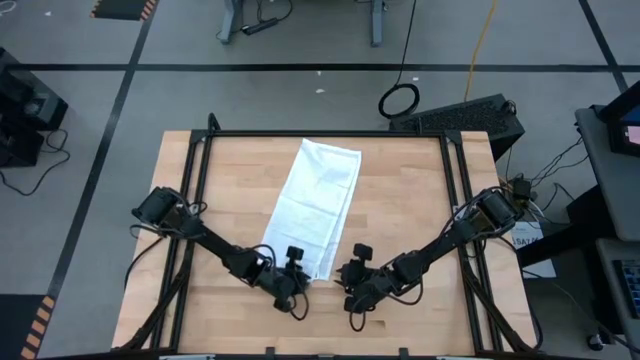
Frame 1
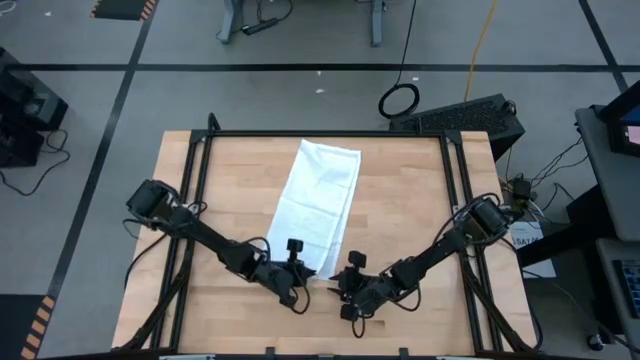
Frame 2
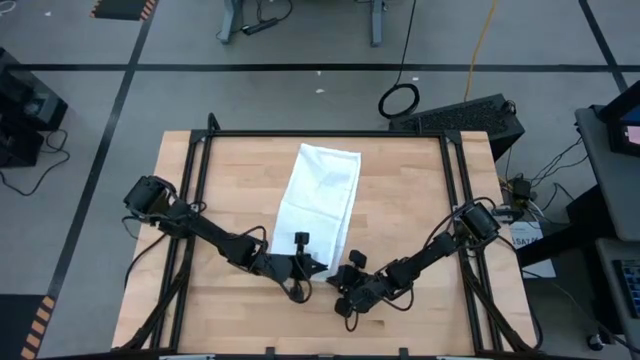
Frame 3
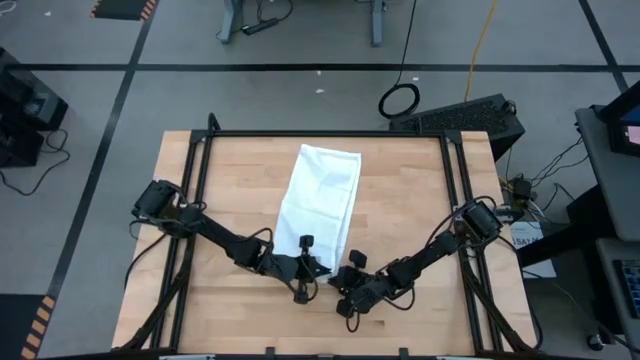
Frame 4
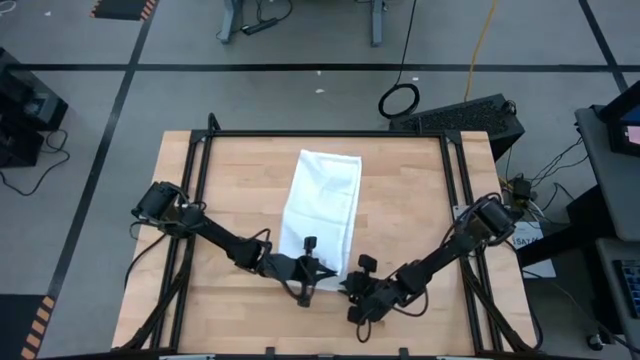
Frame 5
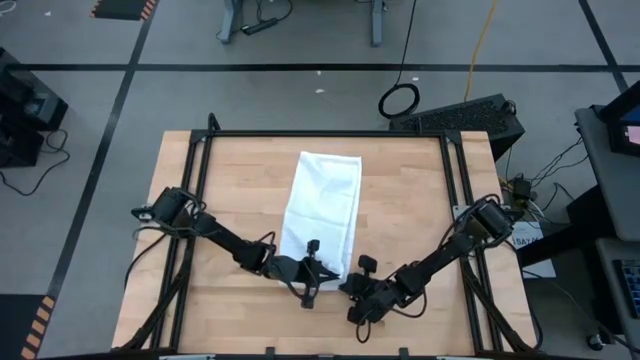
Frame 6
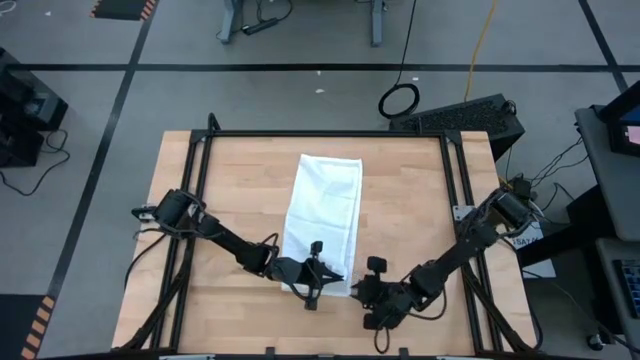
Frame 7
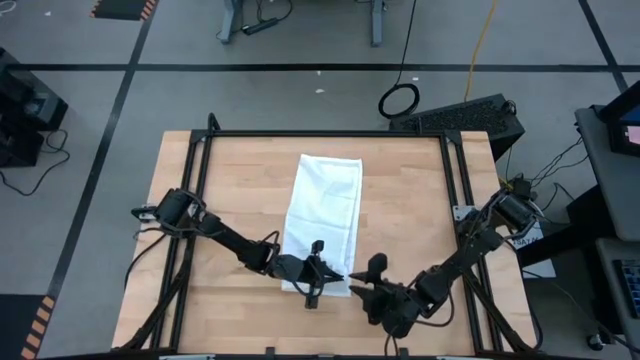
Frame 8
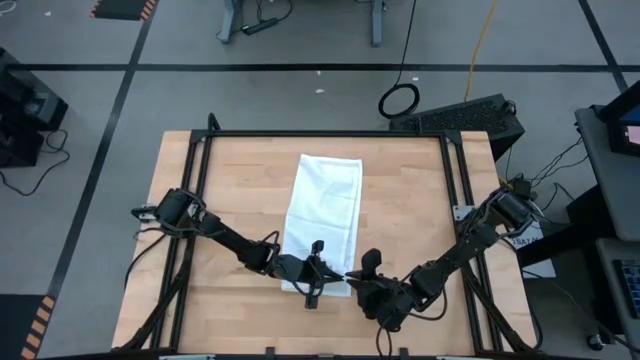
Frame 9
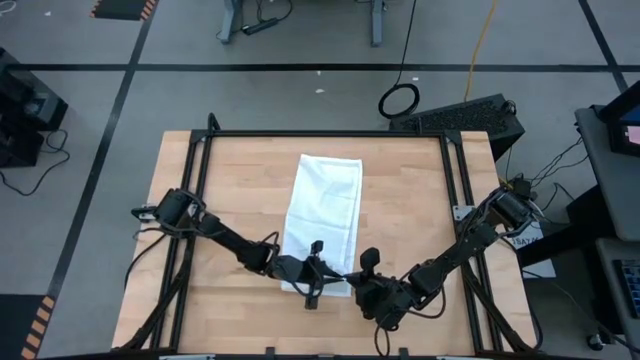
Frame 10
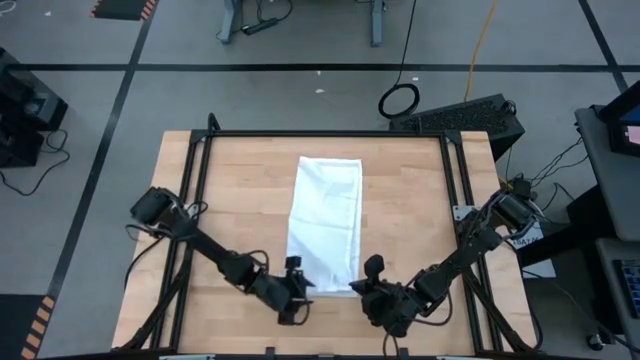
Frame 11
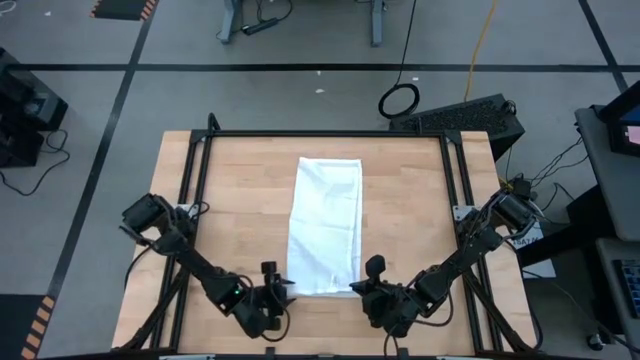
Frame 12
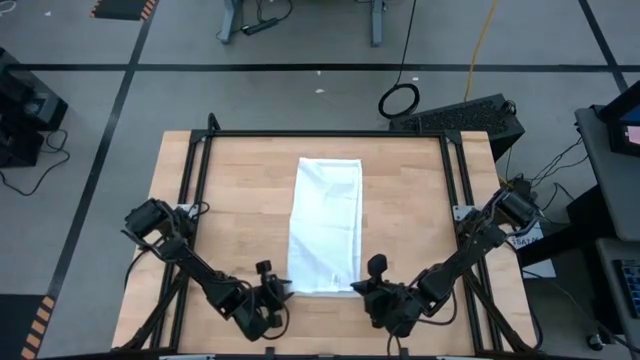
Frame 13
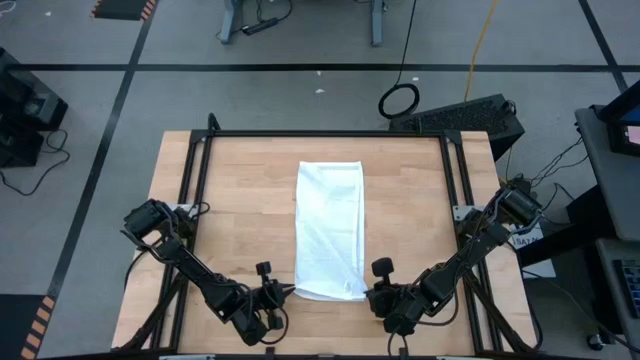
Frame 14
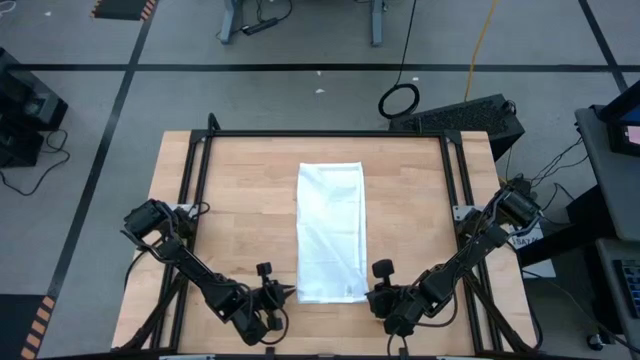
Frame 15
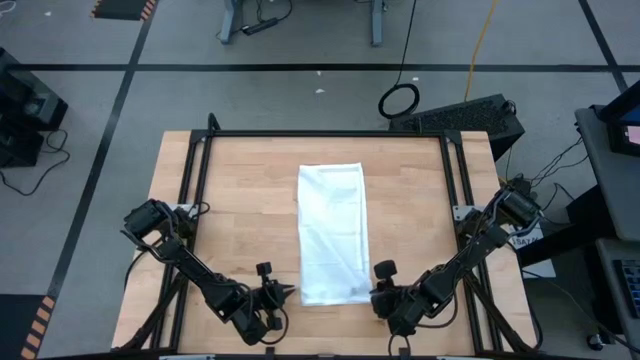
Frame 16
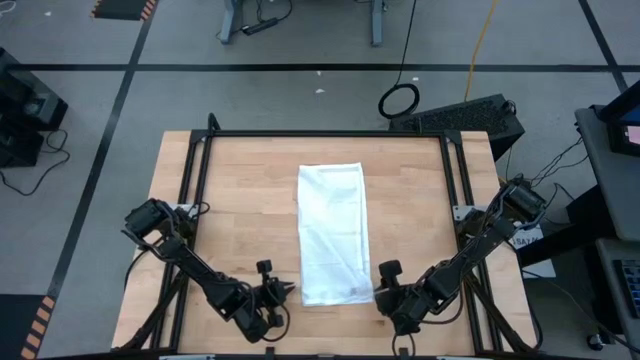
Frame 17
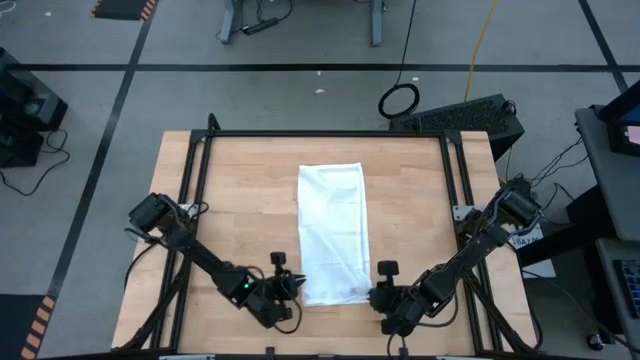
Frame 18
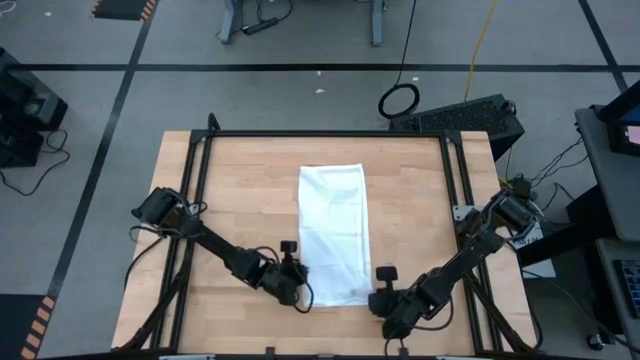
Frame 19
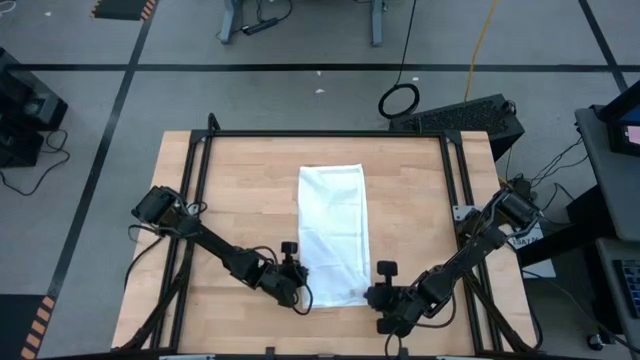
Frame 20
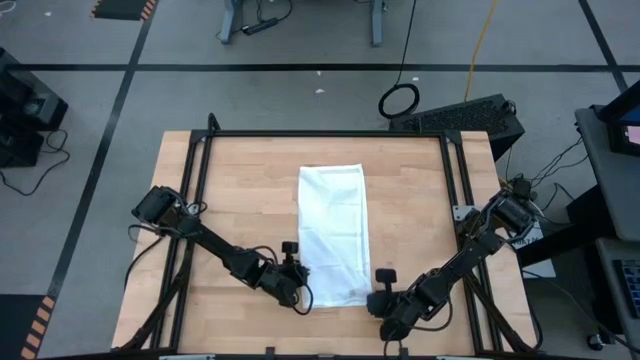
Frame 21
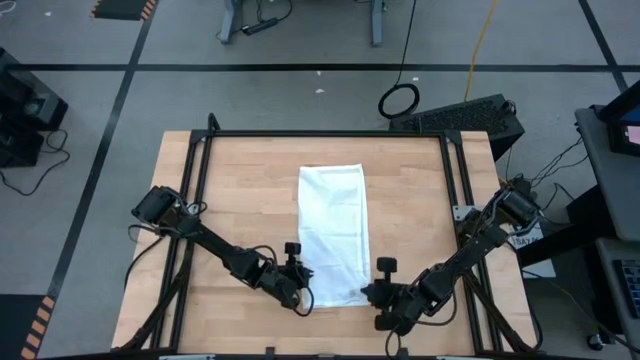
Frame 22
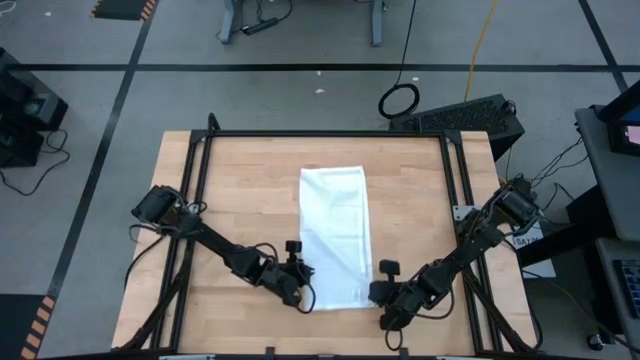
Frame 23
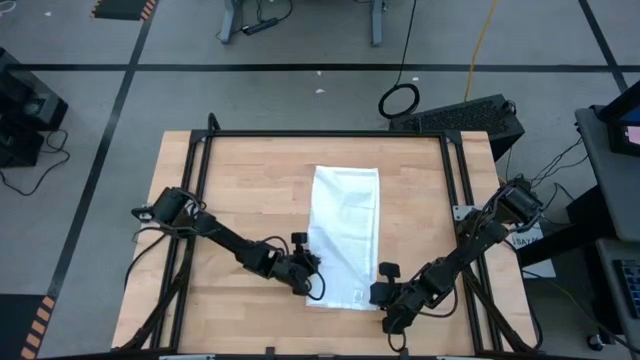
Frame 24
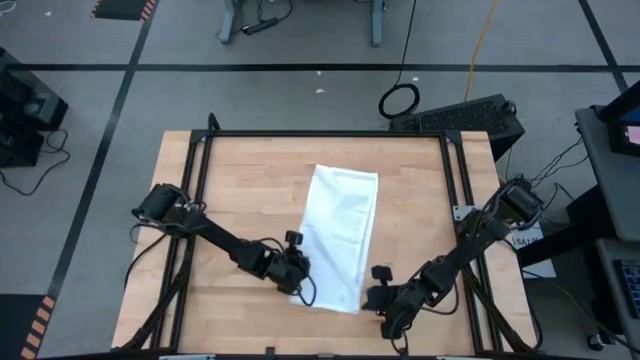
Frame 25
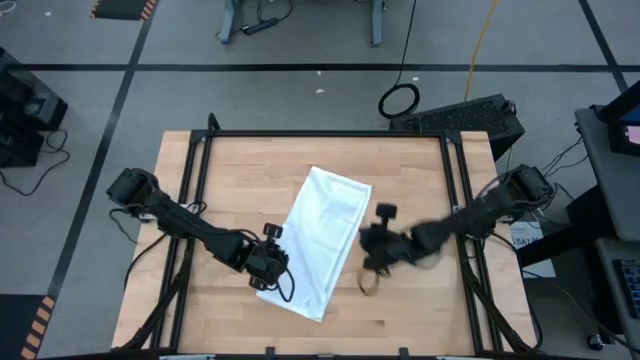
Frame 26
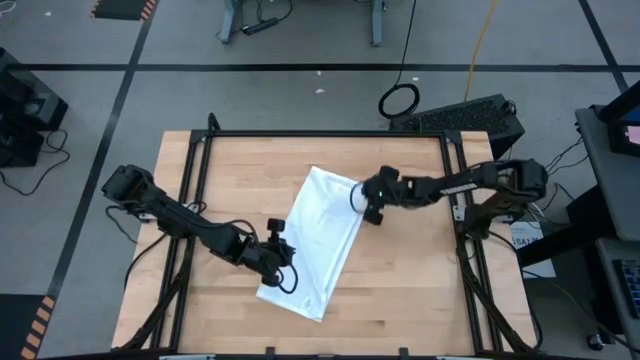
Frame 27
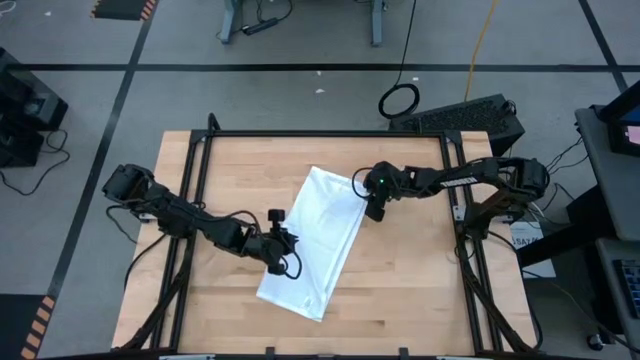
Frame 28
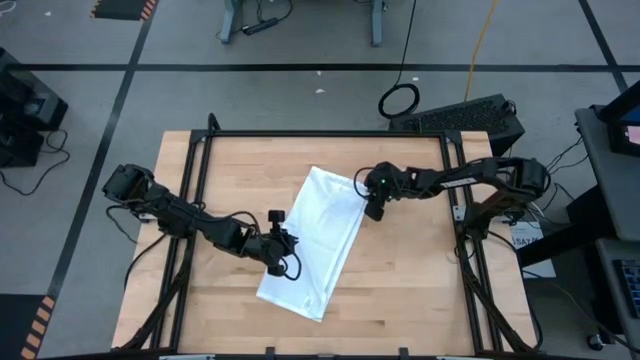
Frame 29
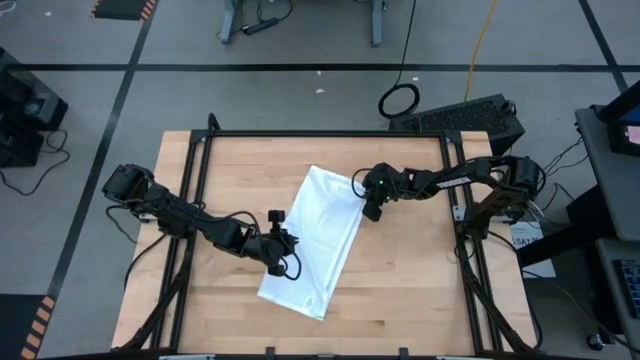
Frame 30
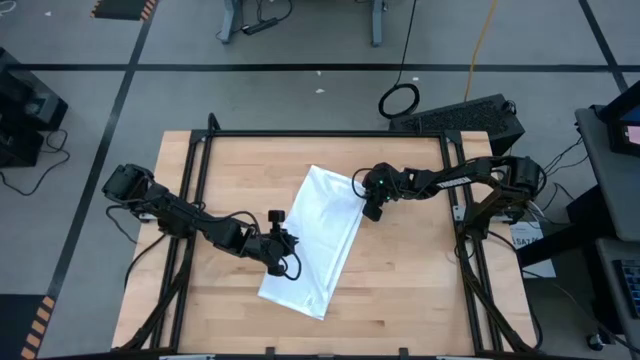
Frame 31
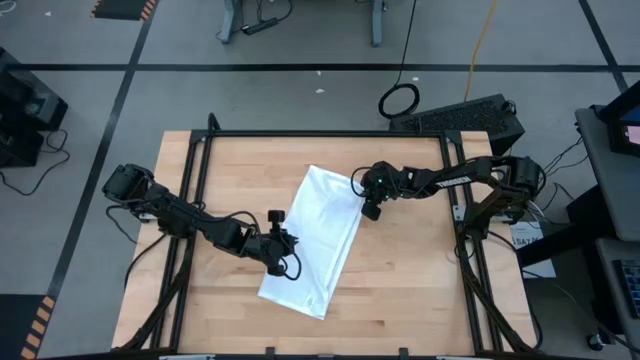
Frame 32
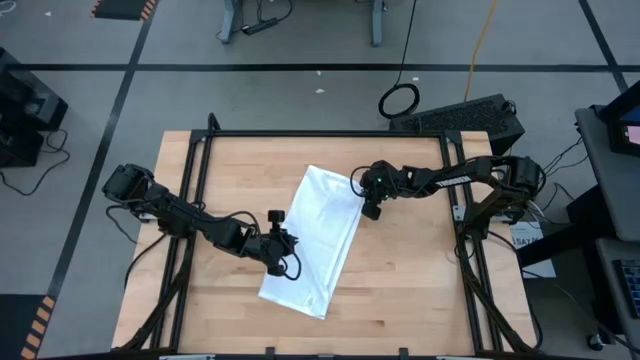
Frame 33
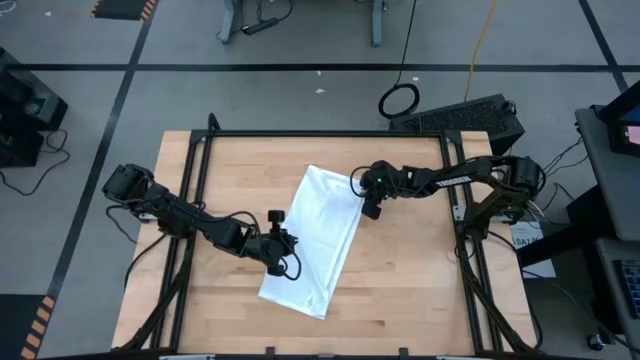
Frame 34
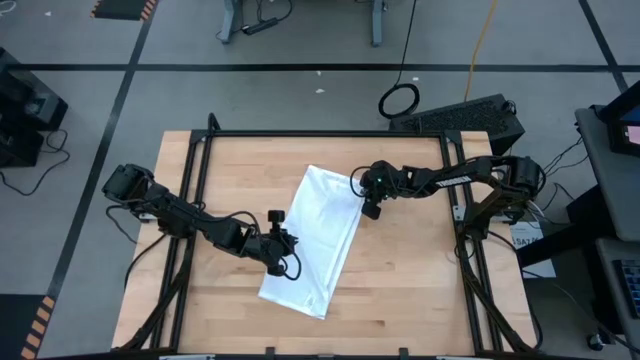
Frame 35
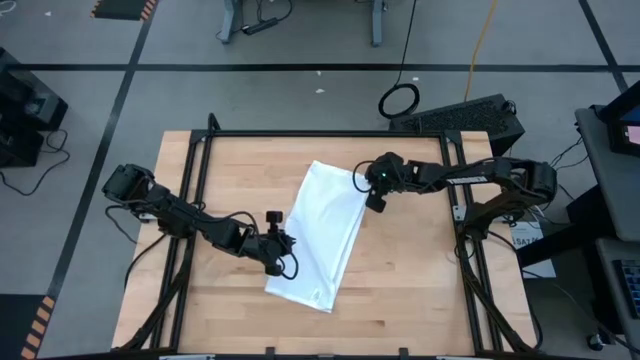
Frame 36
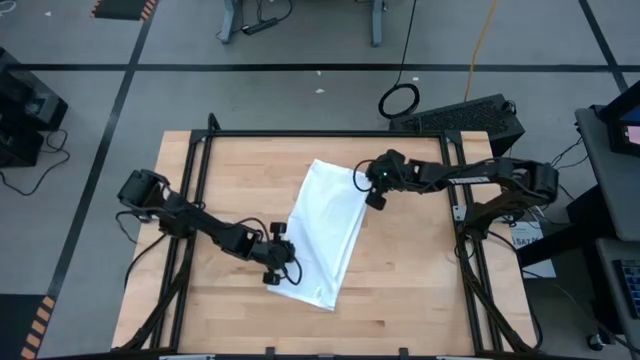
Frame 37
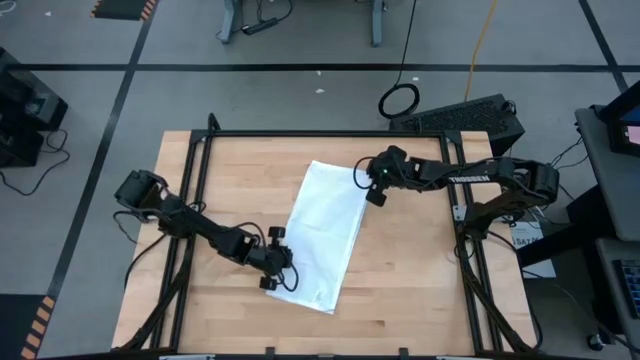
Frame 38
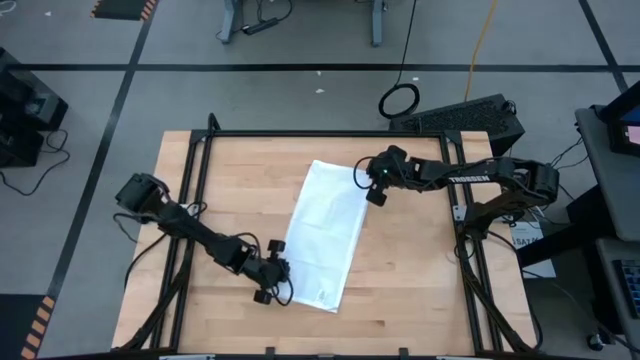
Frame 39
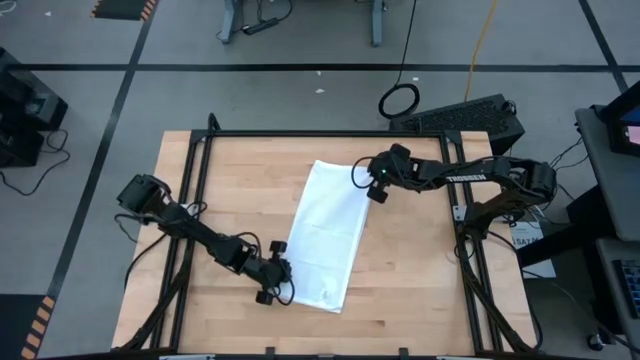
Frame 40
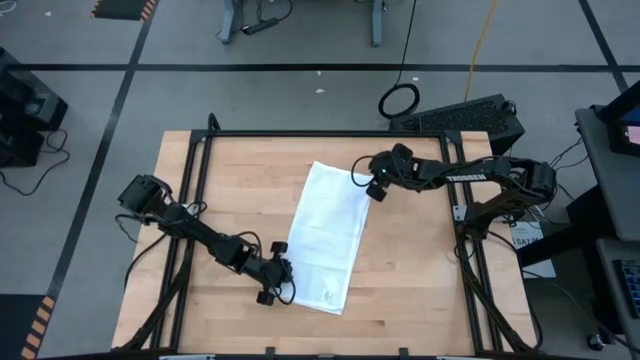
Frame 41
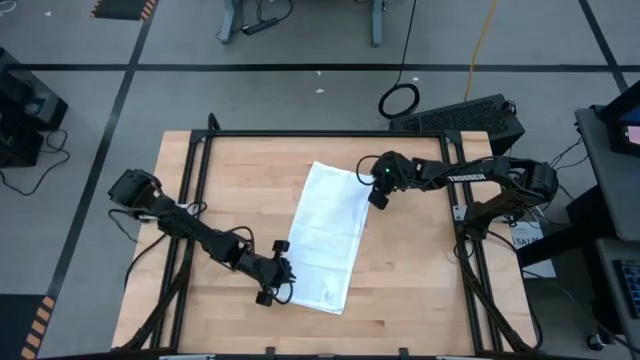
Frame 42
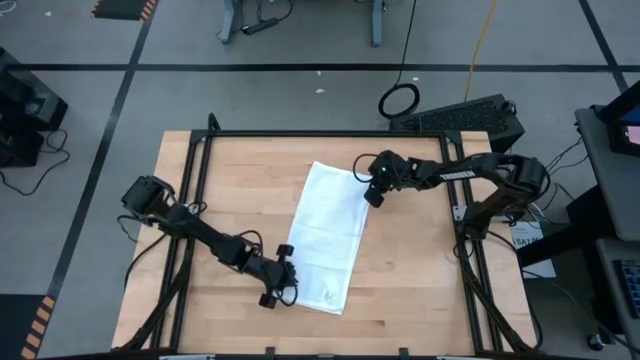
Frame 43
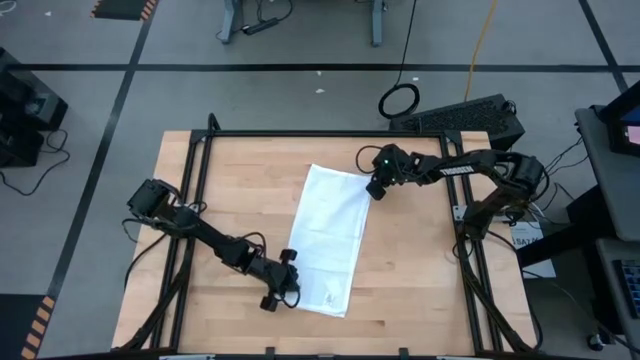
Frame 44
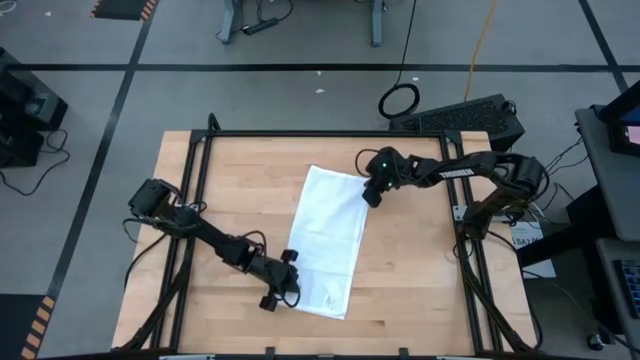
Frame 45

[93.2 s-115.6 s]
Task: Roll towel
Roll the white towel
